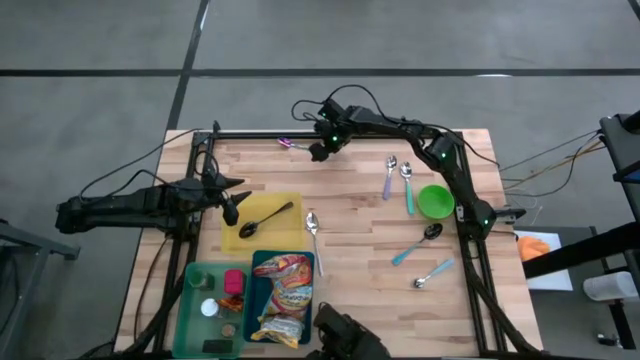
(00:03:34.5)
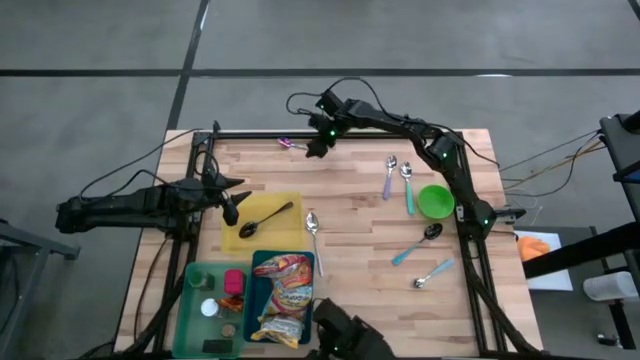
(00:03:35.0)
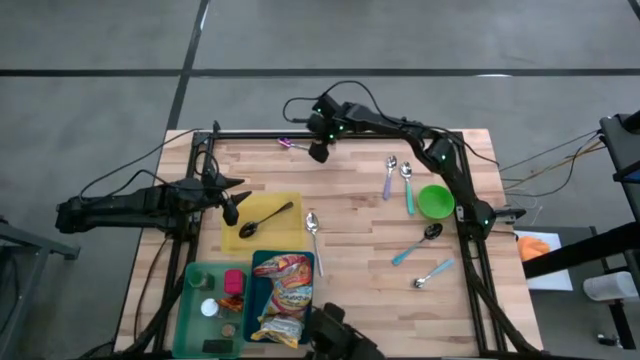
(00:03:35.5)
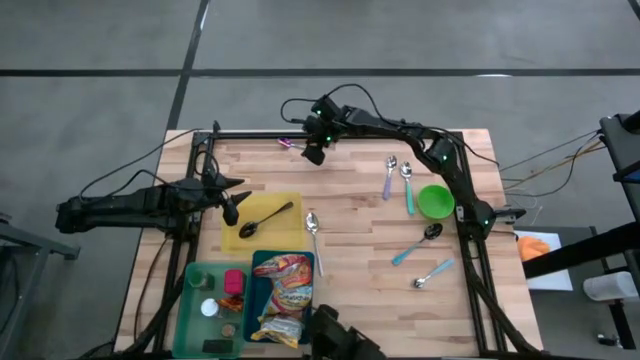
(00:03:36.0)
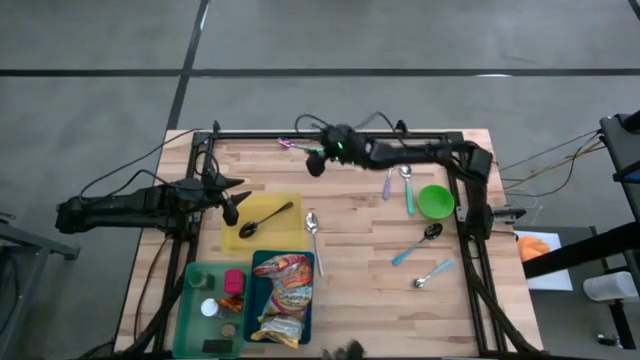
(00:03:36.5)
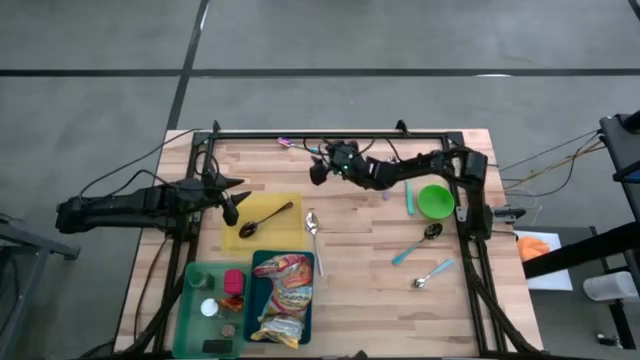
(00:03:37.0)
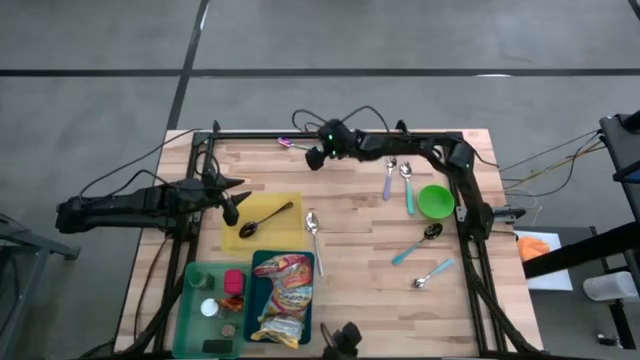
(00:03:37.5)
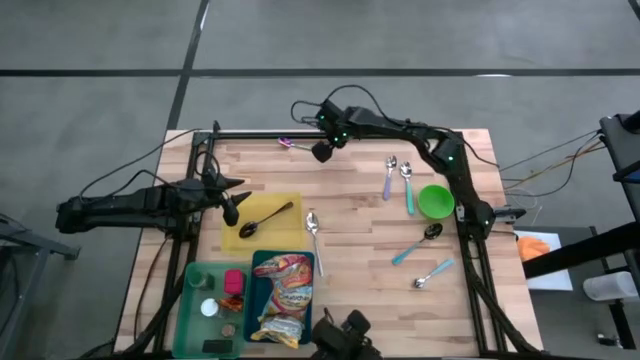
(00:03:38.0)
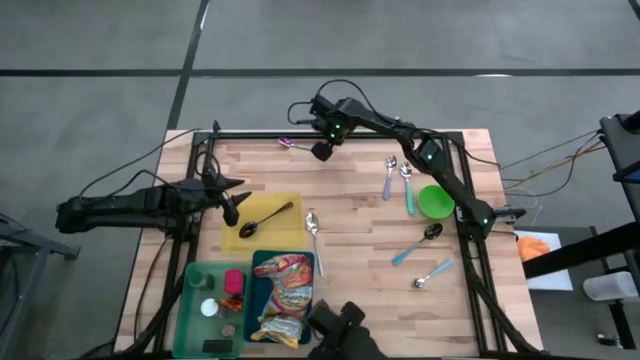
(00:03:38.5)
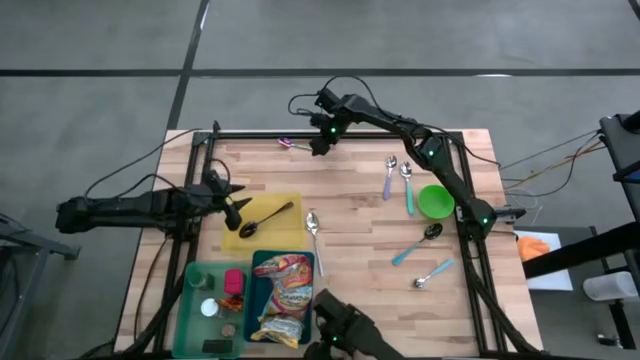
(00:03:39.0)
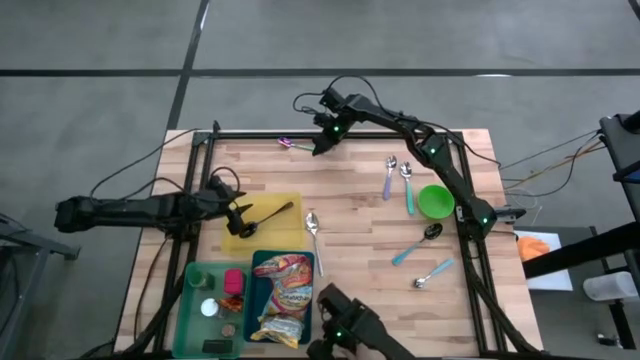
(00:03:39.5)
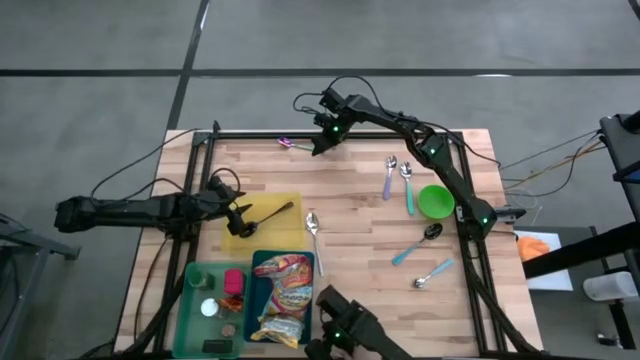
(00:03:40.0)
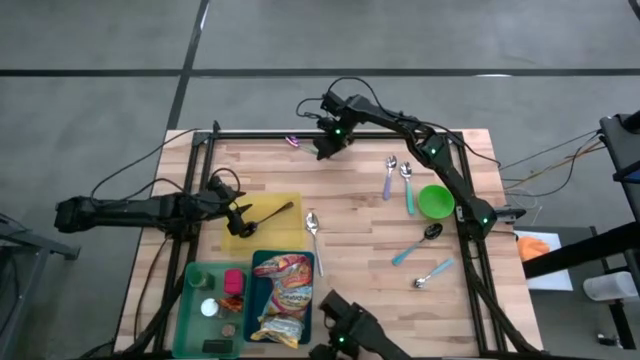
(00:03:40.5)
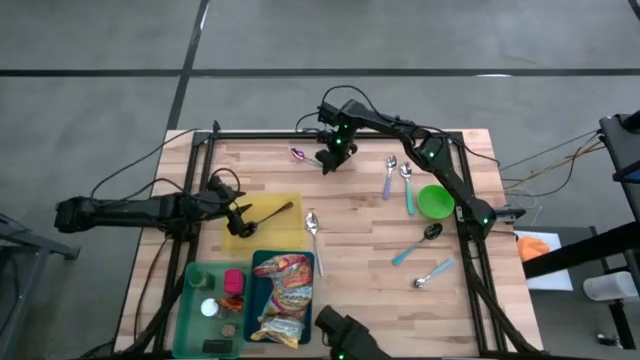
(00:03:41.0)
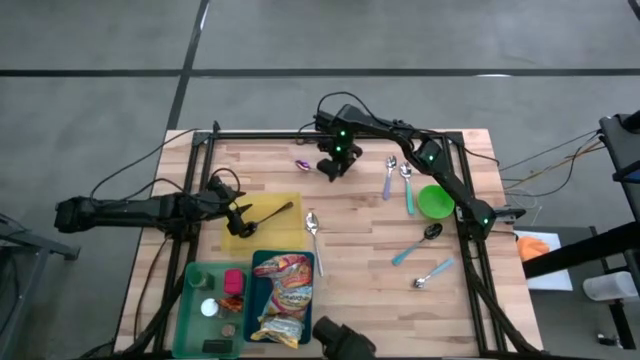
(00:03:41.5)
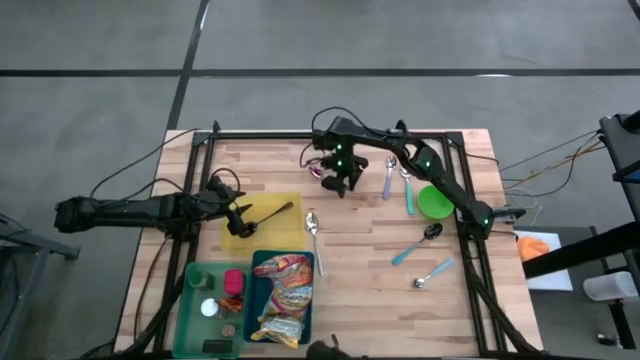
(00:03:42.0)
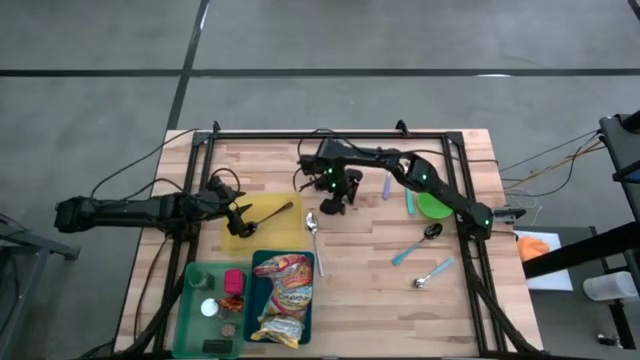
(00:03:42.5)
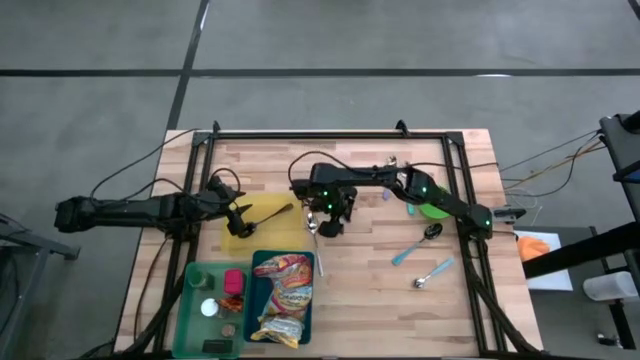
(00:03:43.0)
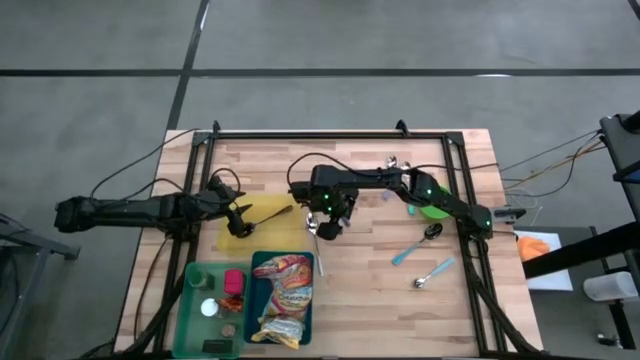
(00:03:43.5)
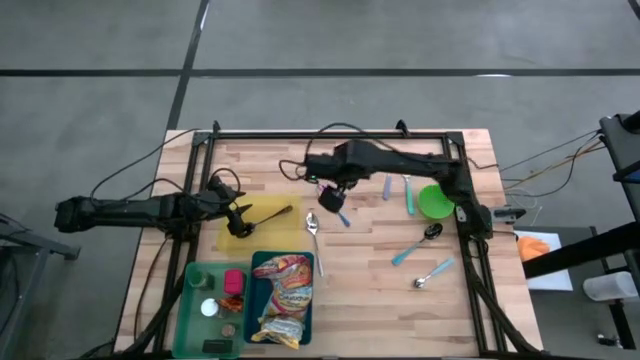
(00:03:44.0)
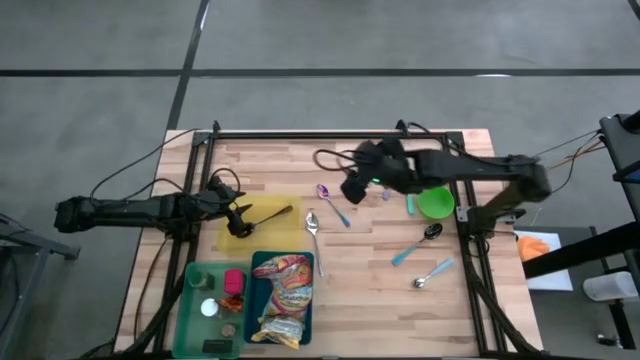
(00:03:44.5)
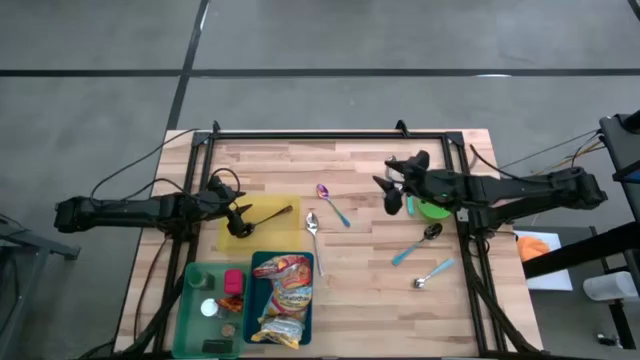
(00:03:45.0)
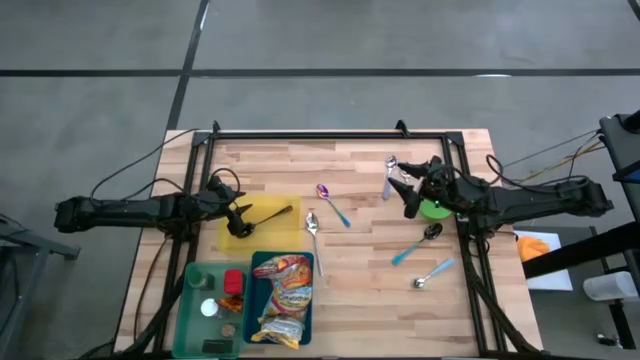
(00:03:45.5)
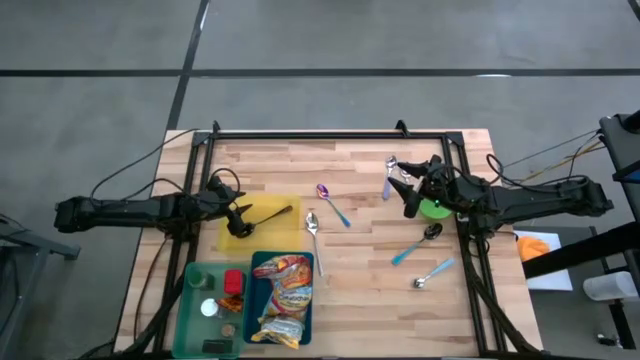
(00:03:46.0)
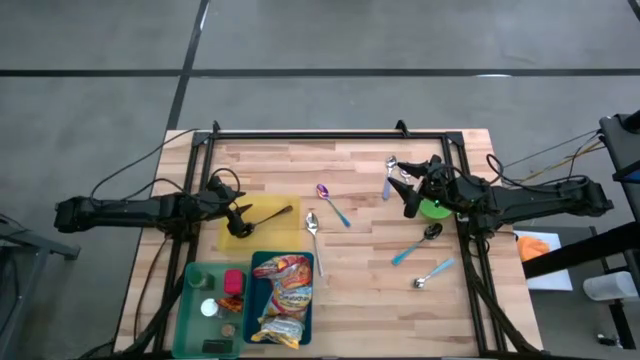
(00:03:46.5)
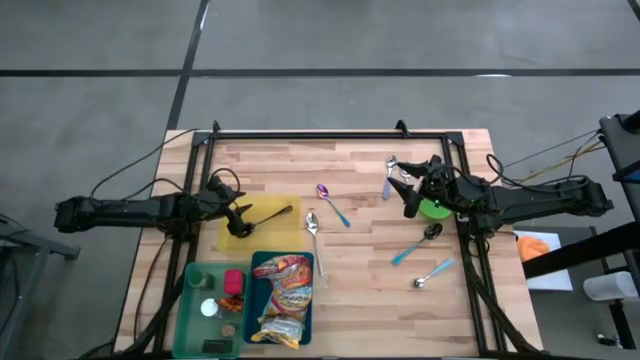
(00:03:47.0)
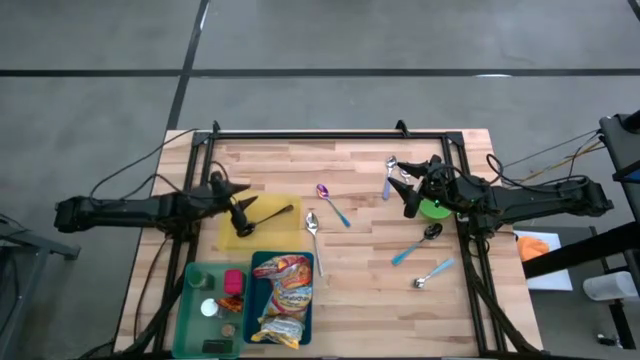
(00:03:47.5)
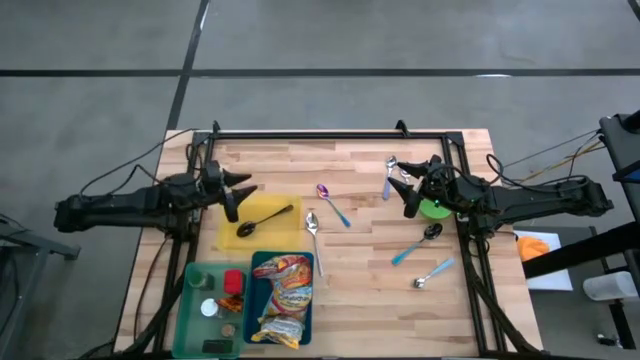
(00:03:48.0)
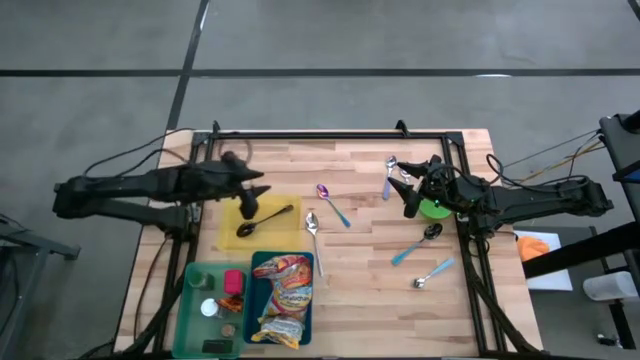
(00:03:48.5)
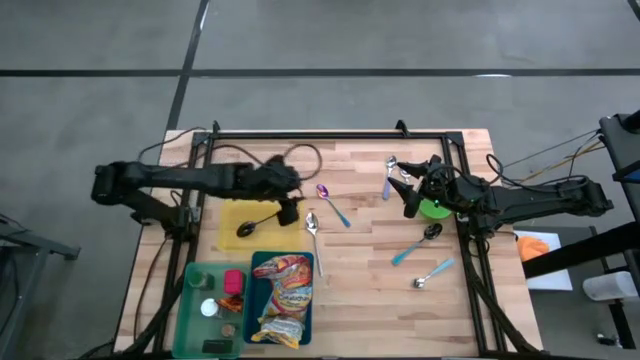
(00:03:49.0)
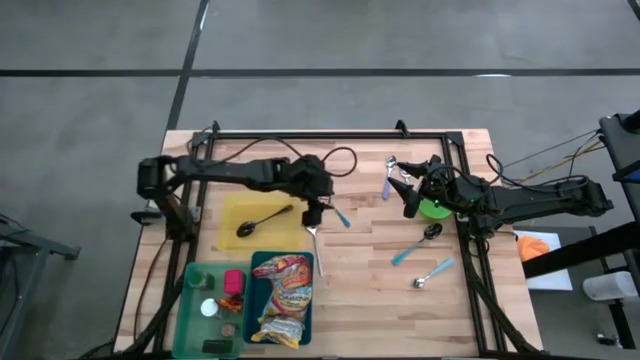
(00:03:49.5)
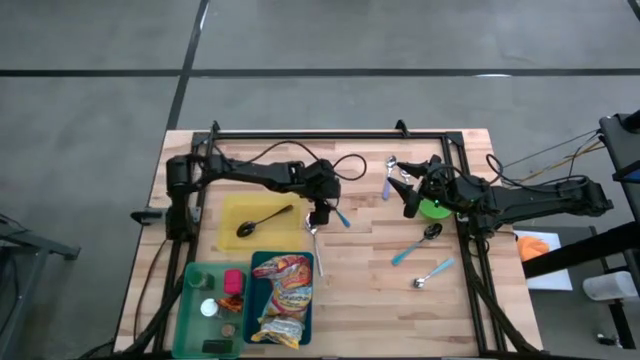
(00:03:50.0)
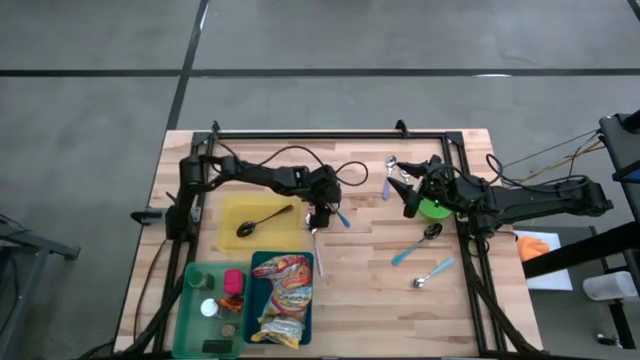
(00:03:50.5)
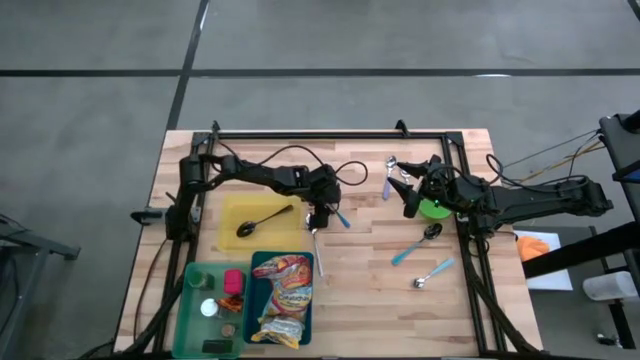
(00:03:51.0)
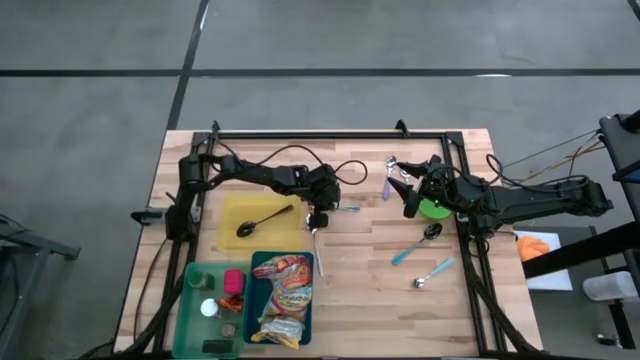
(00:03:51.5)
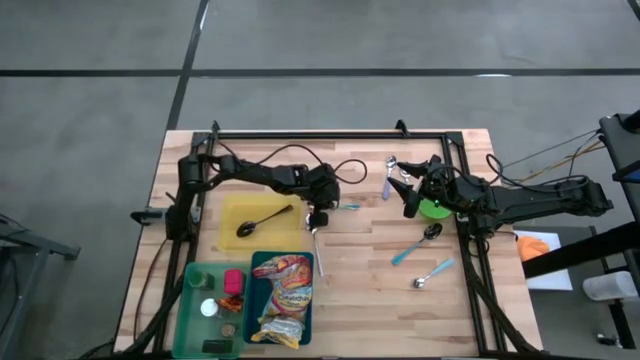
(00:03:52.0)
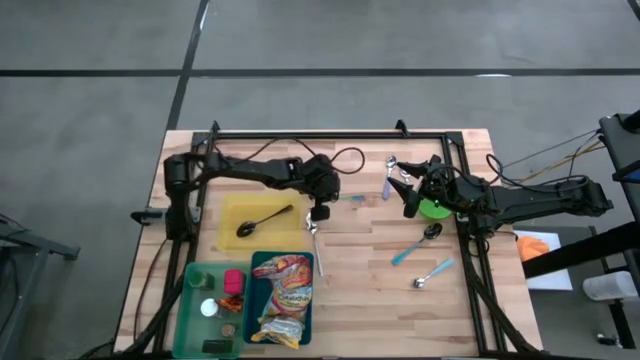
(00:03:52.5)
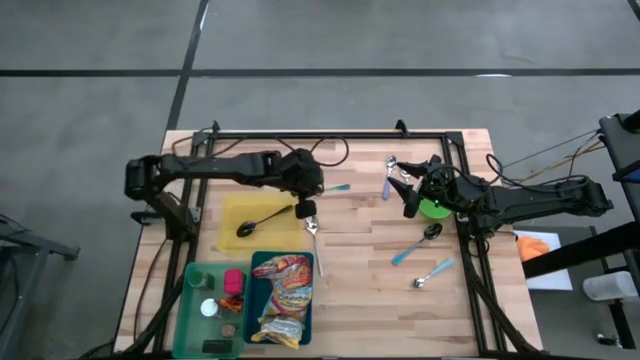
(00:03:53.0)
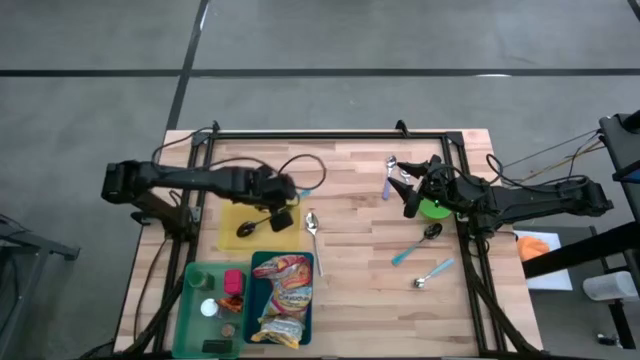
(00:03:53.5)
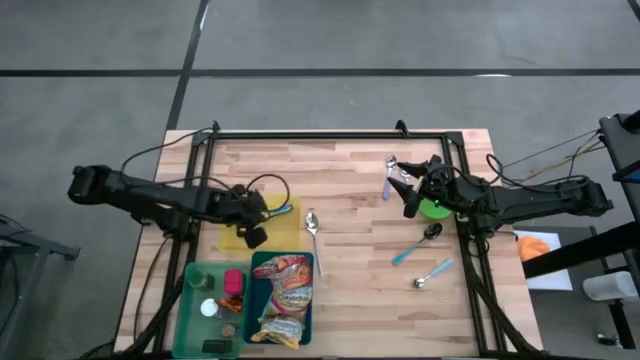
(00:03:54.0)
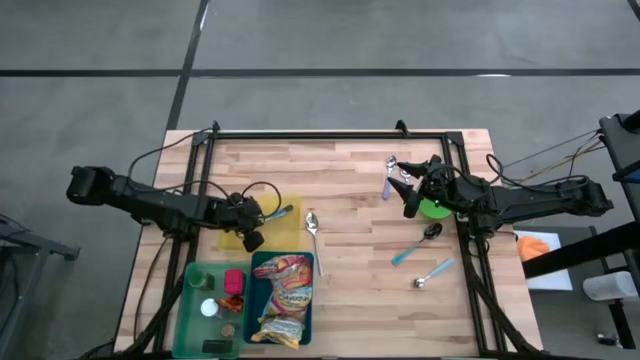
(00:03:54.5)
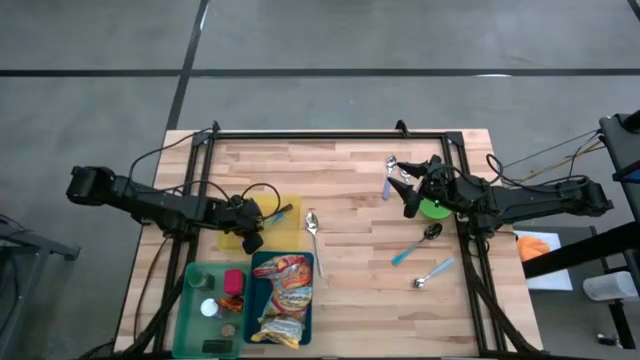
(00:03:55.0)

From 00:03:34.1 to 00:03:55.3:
Put the purple spoon into the yellow bin
